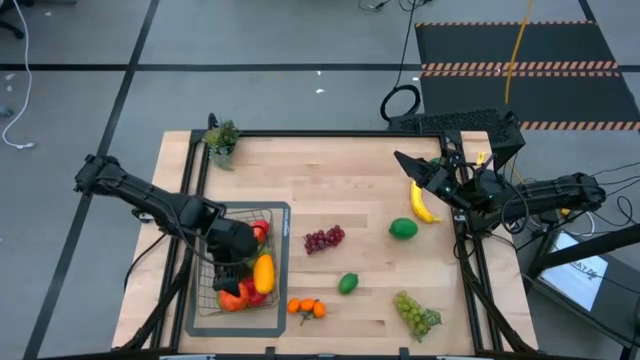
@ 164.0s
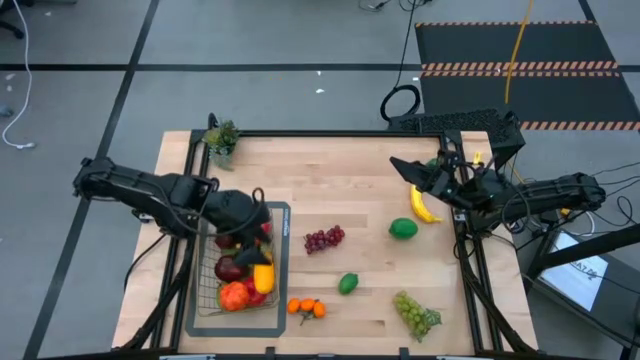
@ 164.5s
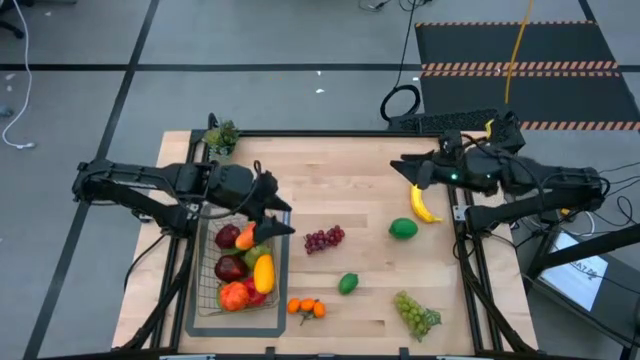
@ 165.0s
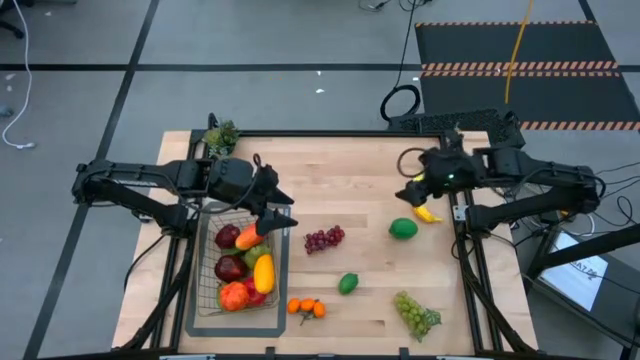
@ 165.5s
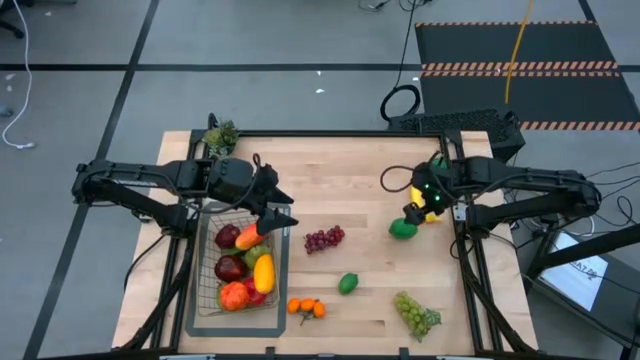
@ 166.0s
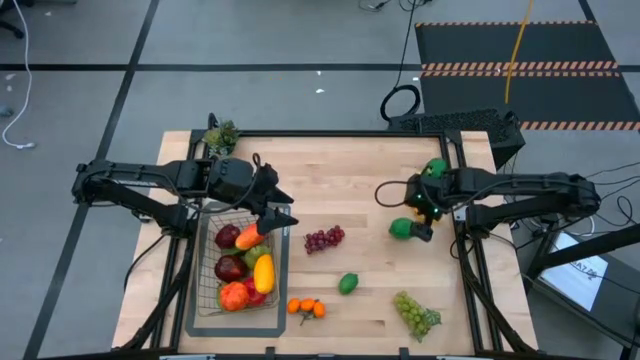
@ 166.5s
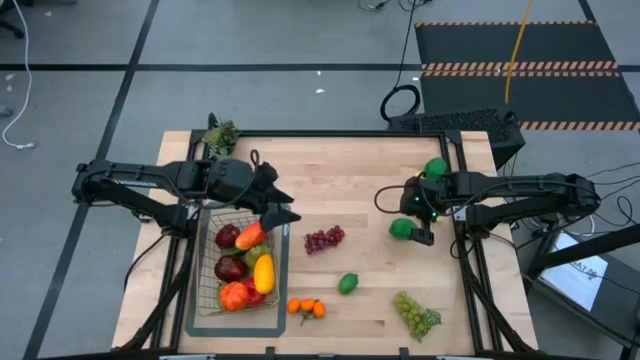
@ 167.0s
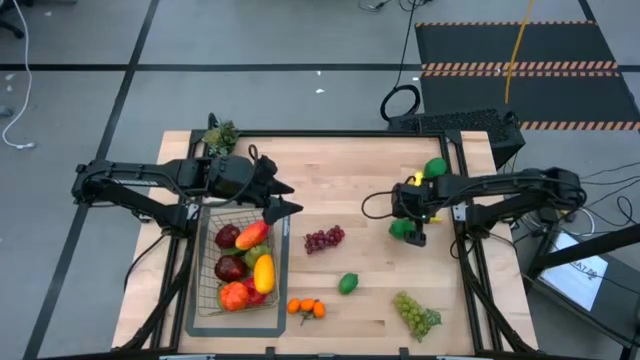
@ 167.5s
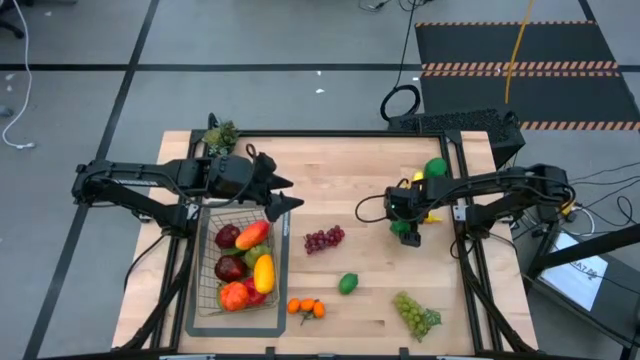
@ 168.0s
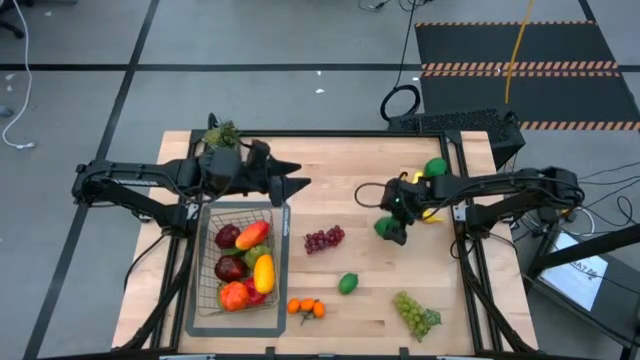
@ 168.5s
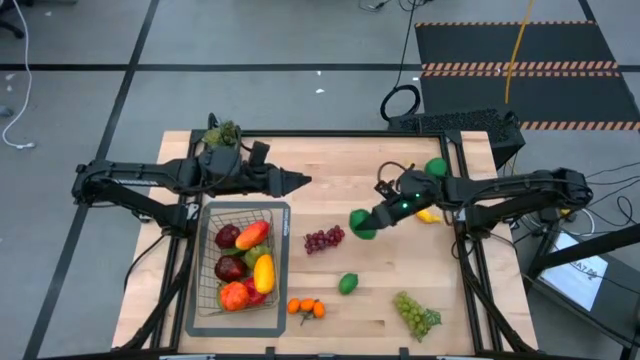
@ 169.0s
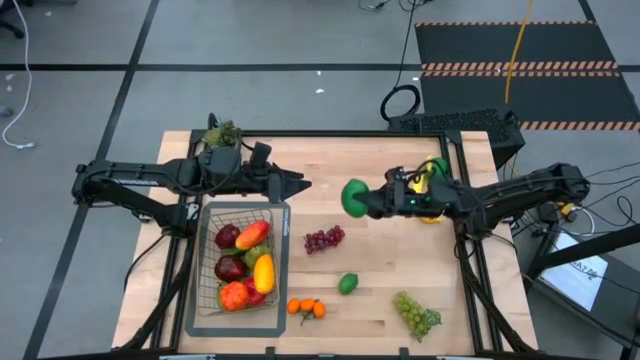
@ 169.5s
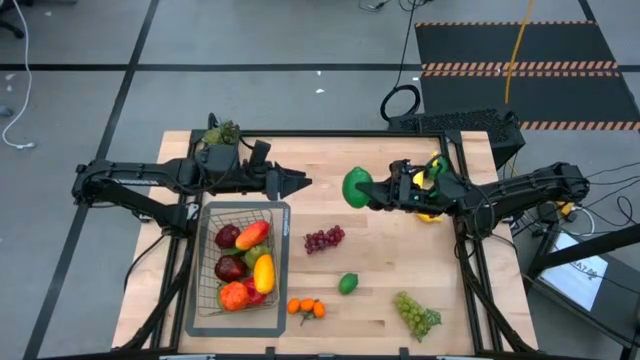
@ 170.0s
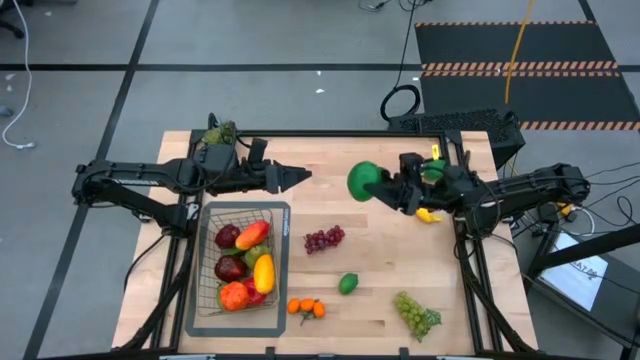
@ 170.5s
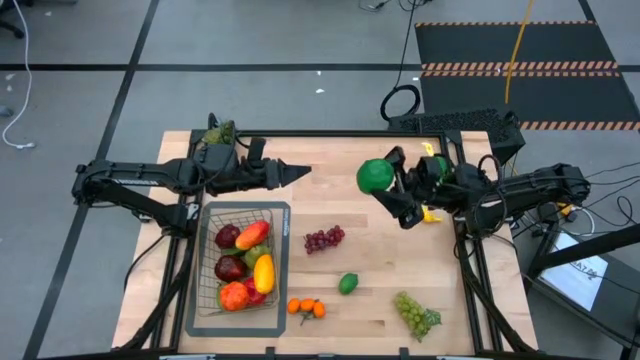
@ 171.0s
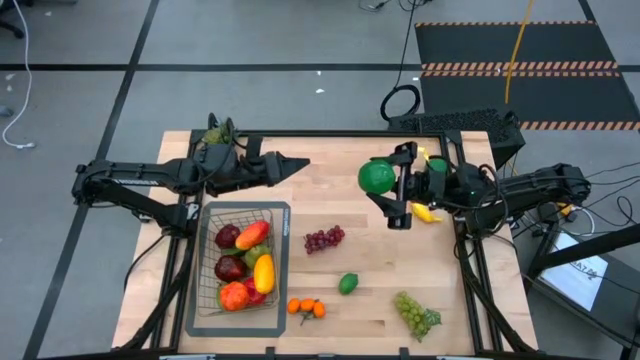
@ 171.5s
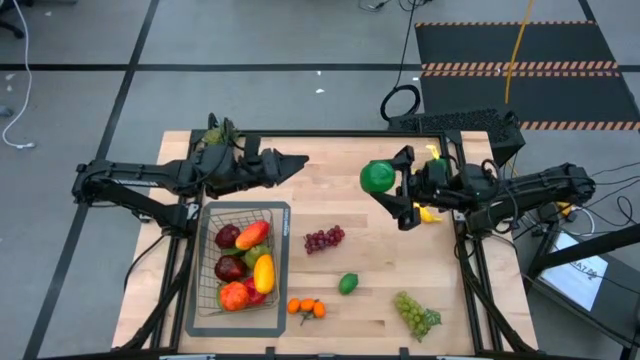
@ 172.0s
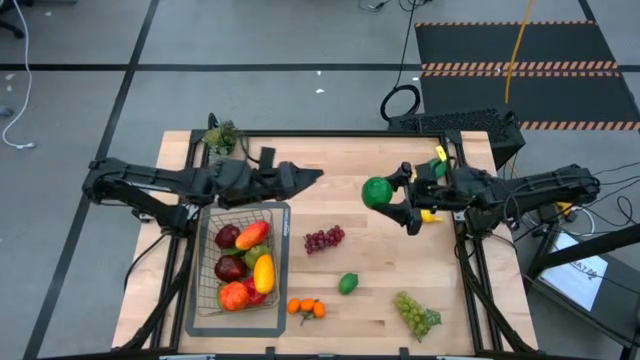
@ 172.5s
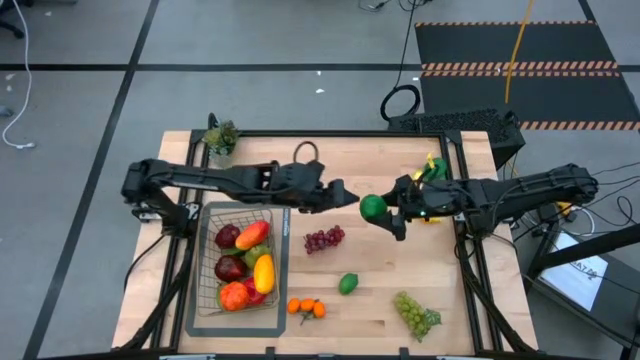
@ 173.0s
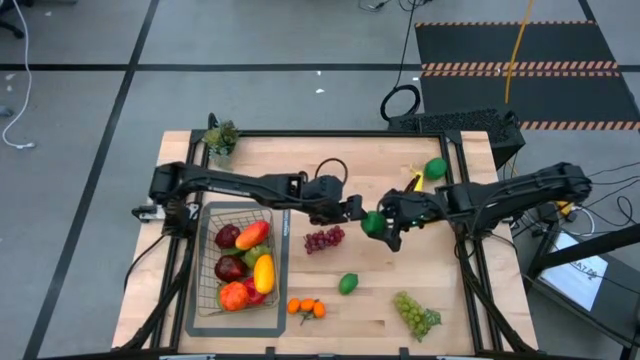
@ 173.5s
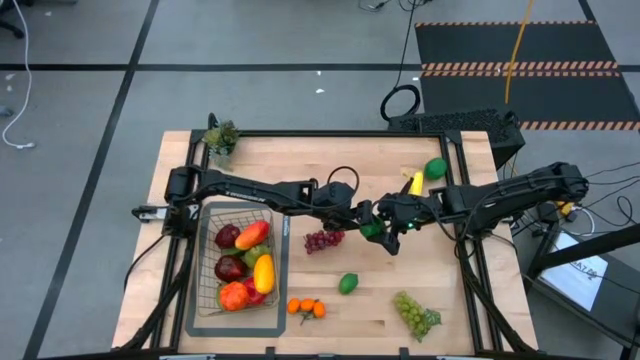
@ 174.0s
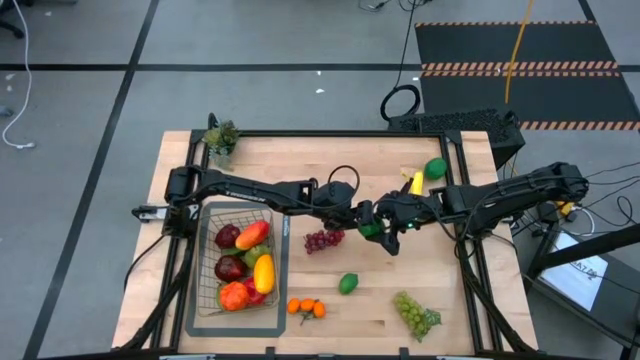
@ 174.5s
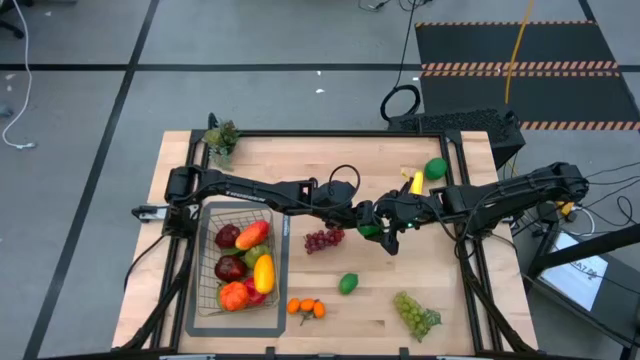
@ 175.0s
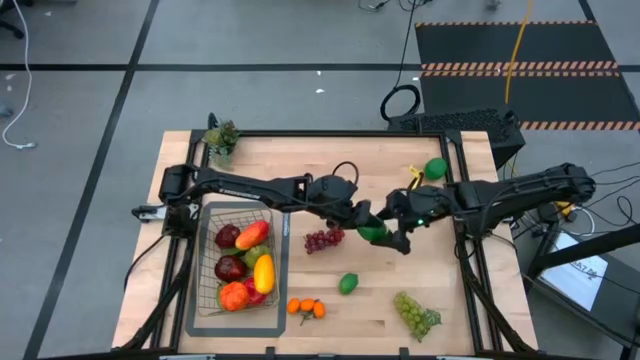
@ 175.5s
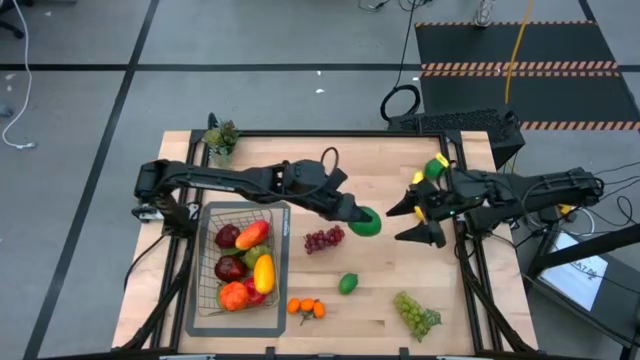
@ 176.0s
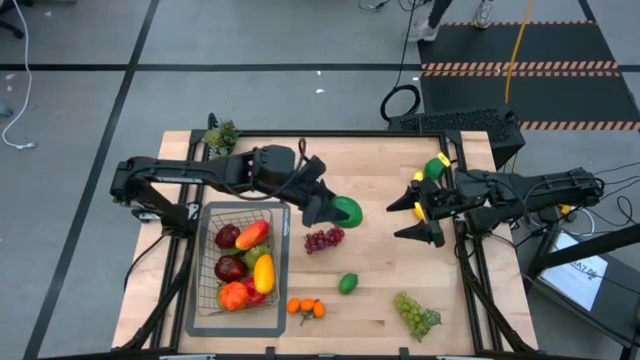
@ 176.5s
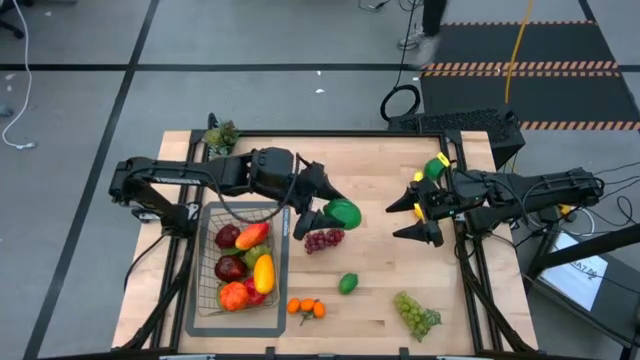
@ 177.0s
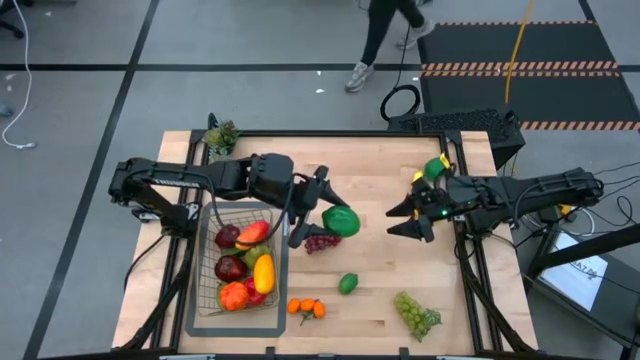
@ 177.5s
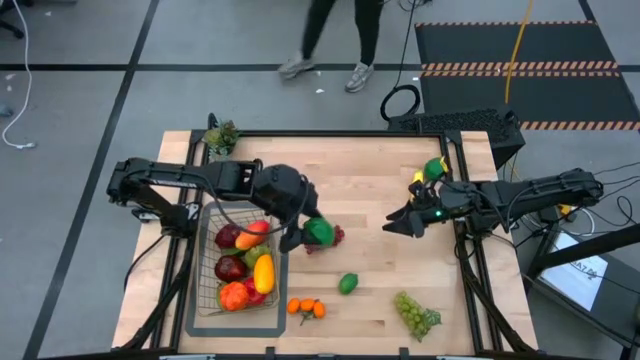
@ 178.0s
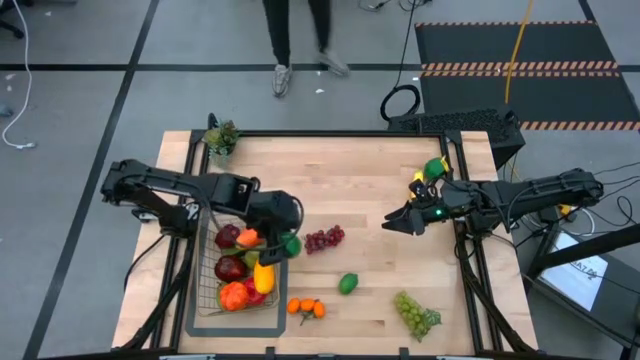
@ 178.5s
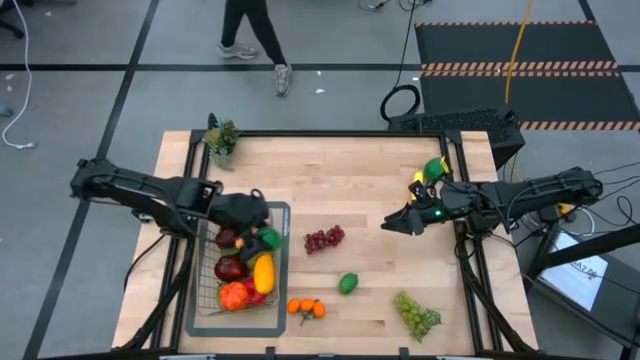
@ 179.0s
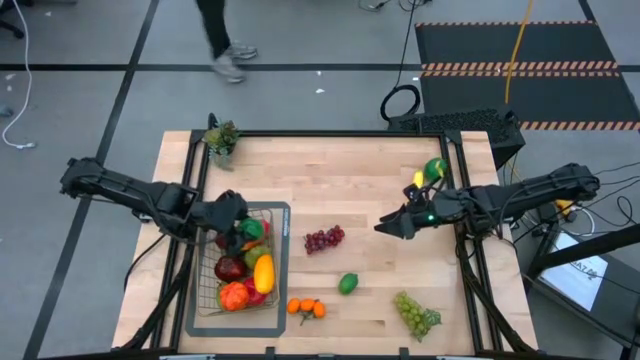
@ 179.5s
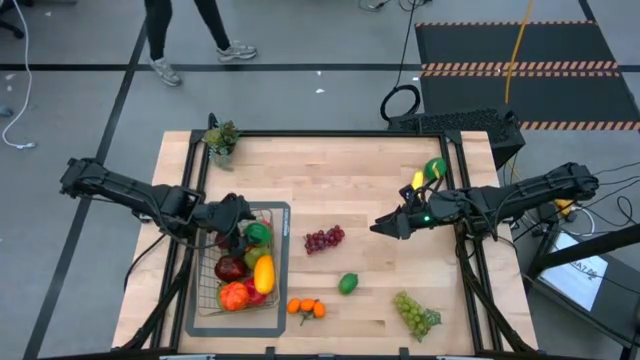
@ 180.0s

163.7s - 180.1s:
Task: Build produce basket
Put the middle green lime into the wire basket

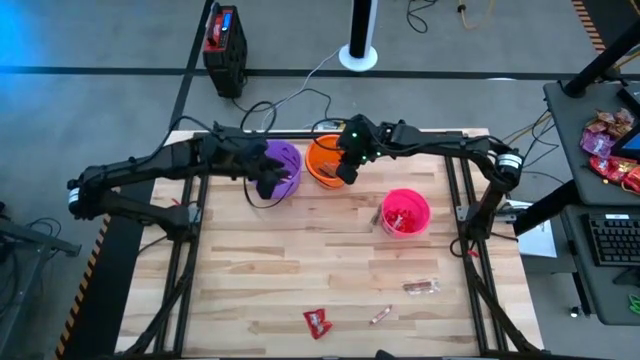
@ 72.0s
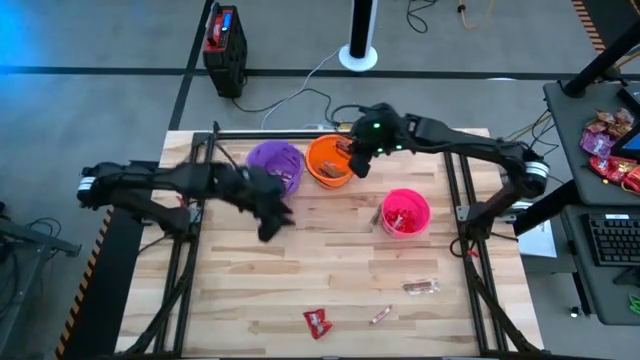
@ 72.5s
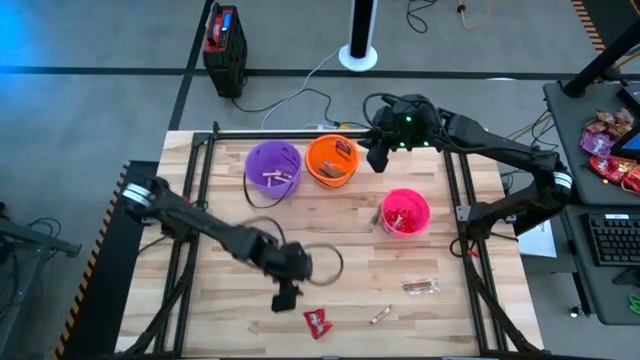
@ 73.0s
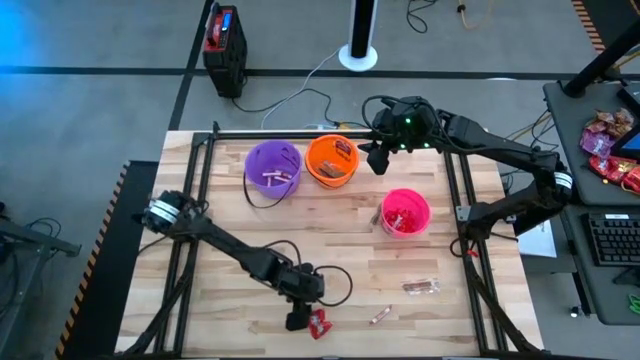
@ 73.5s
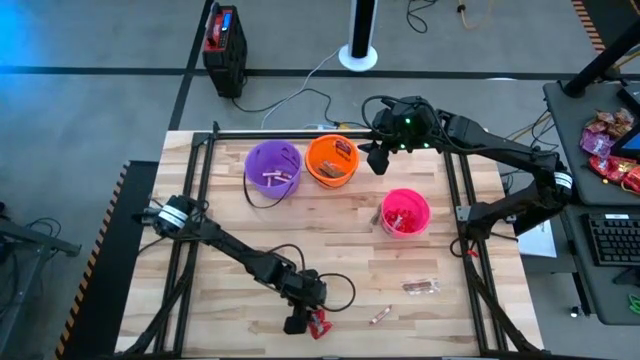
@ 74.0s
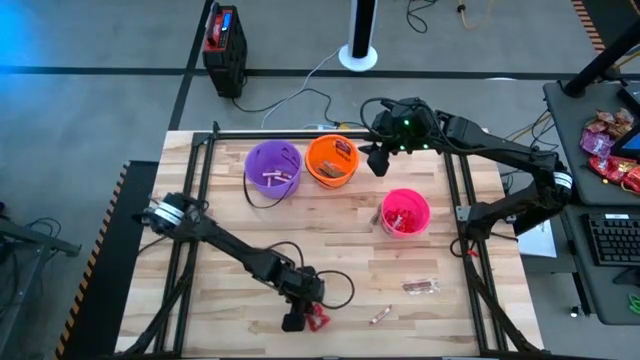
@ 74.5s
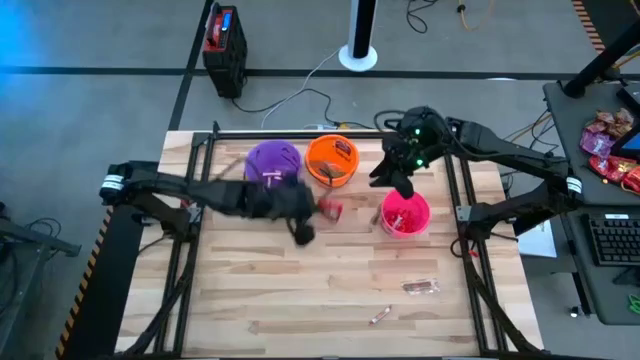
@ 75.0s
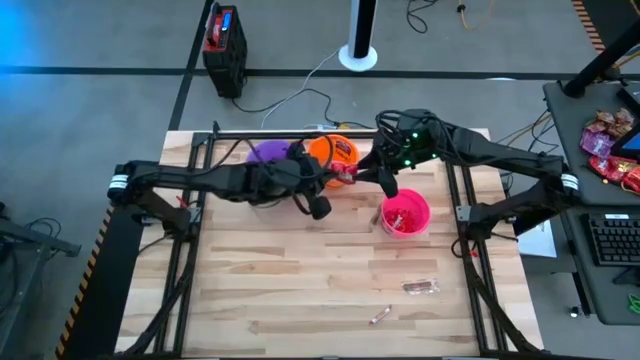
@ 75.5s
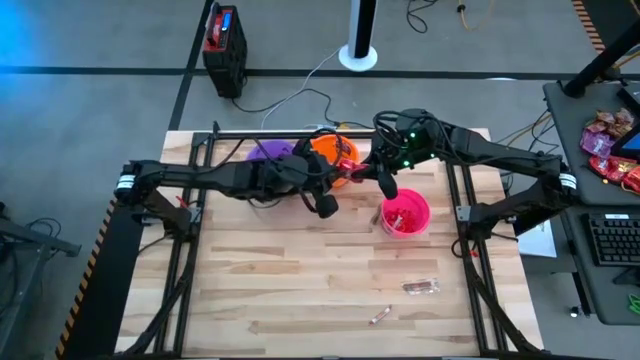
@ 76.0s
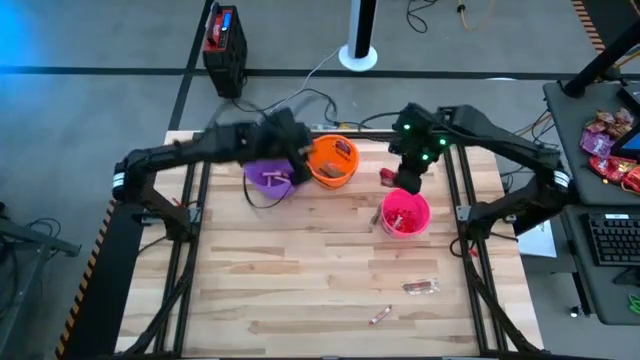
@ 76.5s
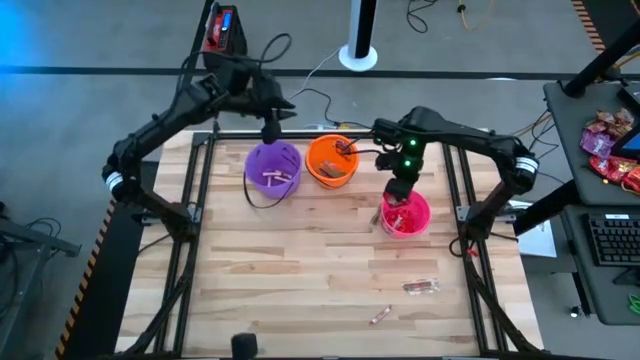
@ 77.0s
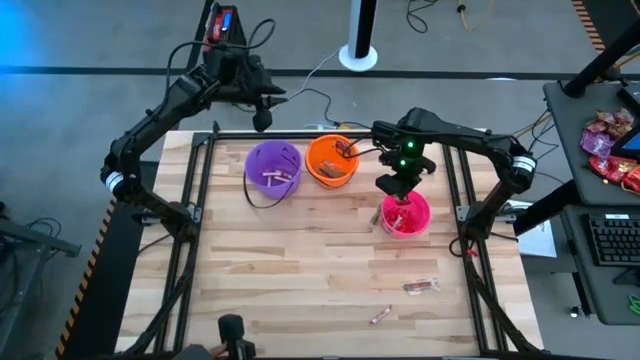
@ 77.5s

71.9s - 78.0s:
Task: Sort candy by brand, put in halloween buckets
Put the red candy into the pink bucket
